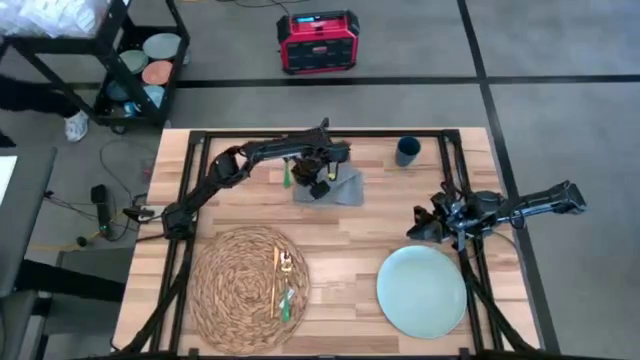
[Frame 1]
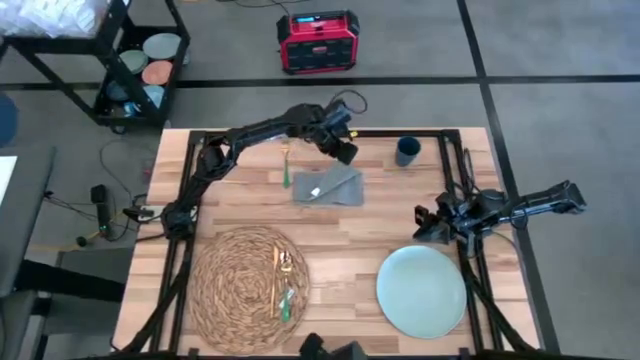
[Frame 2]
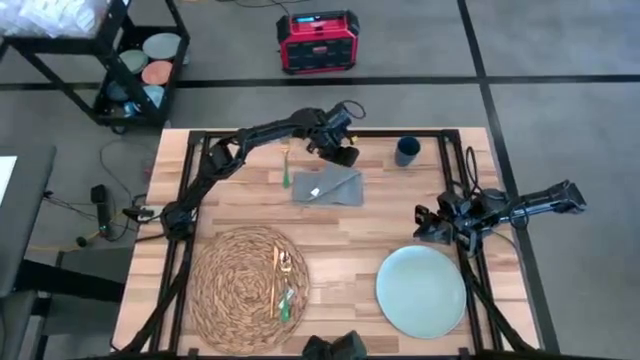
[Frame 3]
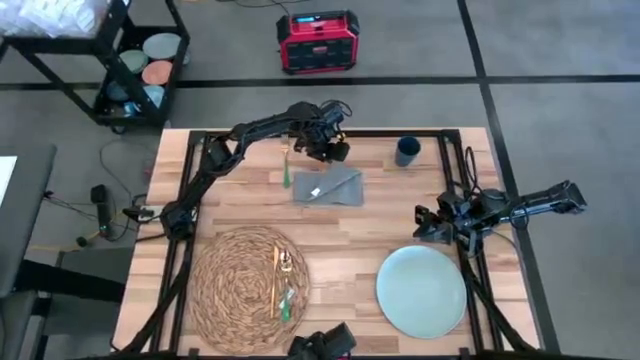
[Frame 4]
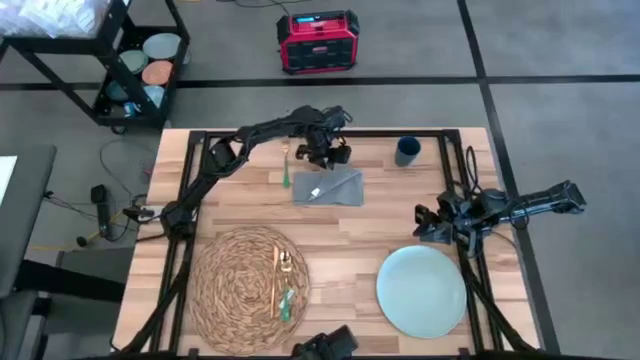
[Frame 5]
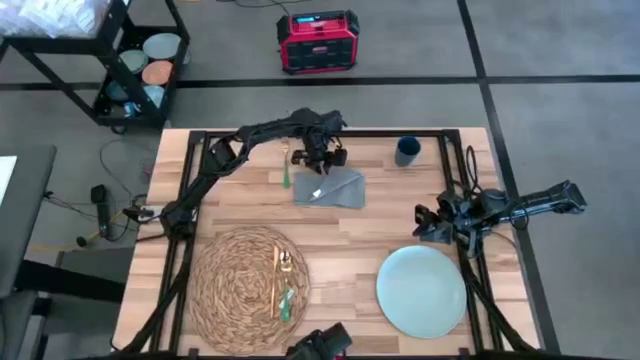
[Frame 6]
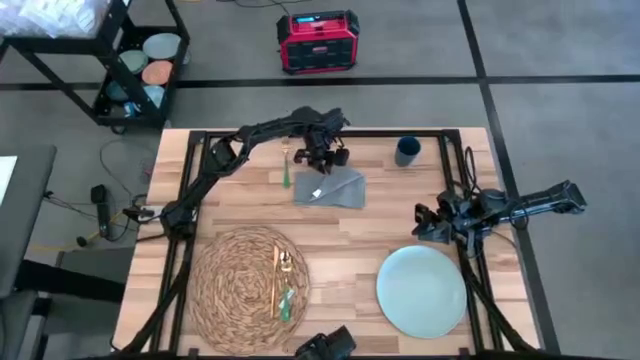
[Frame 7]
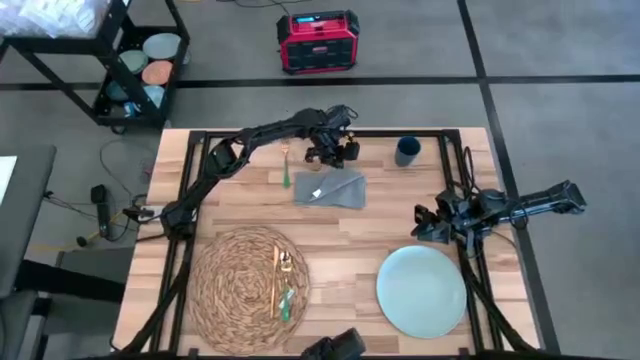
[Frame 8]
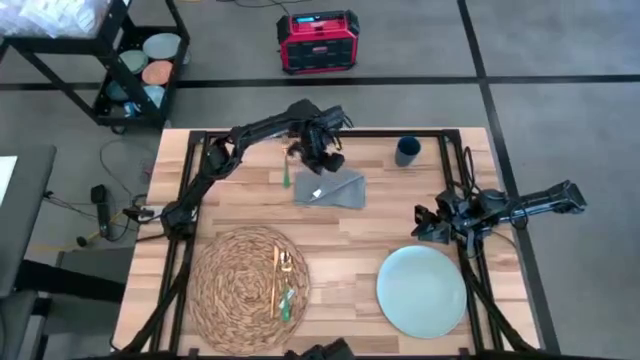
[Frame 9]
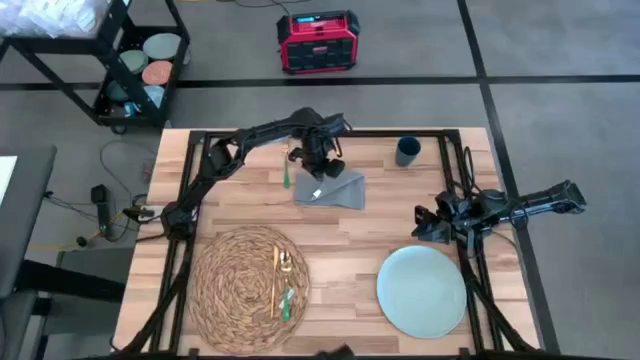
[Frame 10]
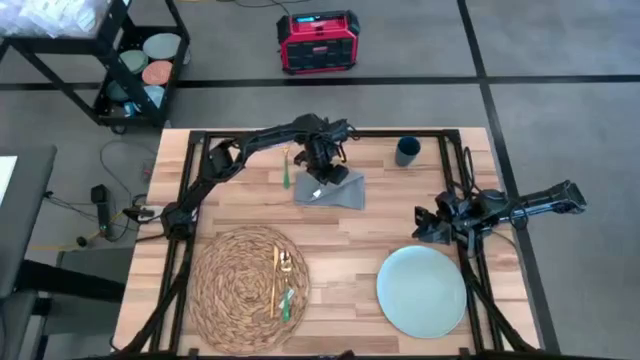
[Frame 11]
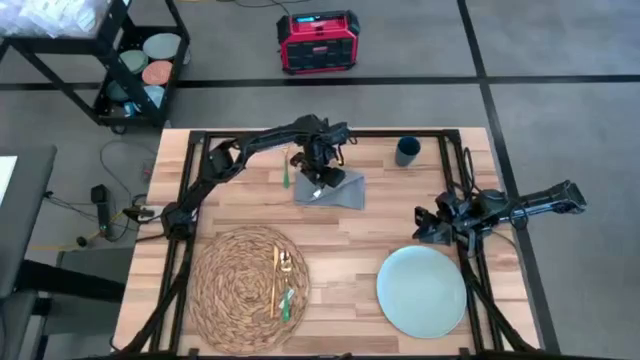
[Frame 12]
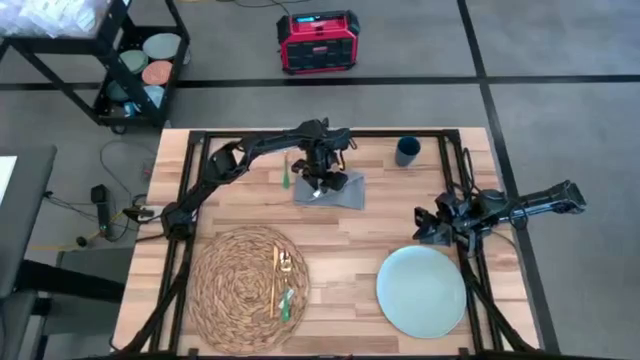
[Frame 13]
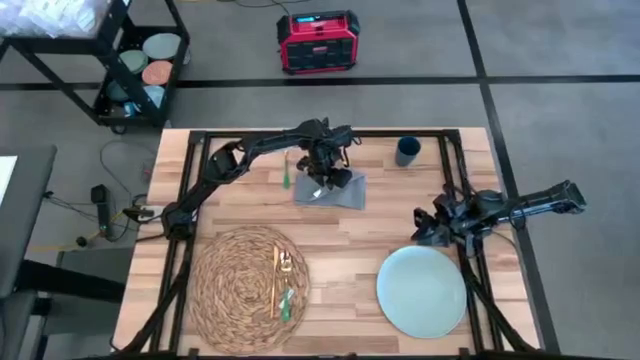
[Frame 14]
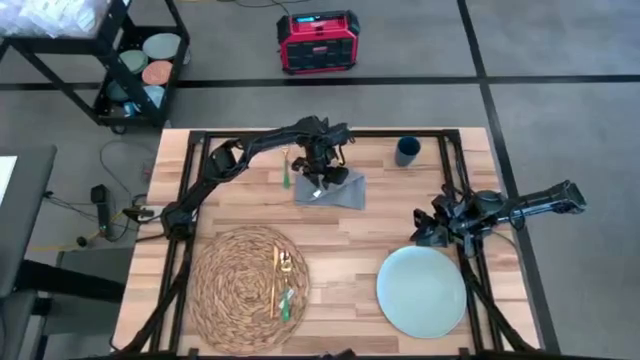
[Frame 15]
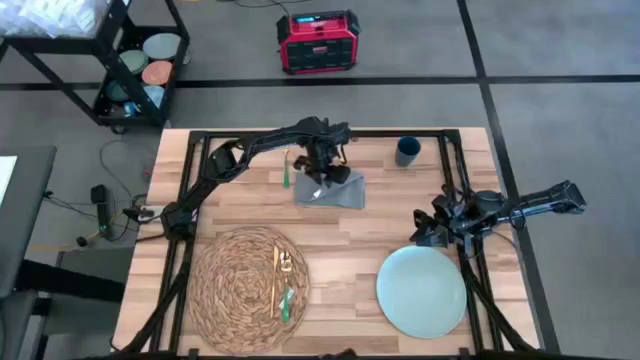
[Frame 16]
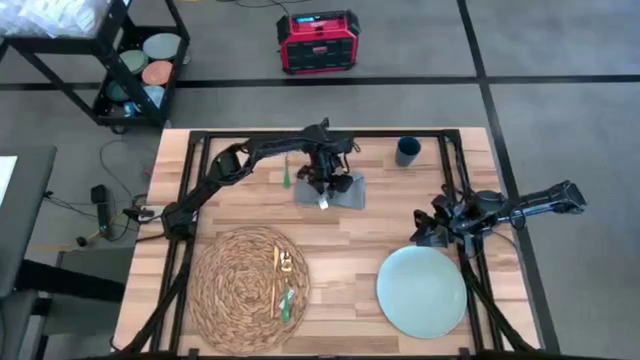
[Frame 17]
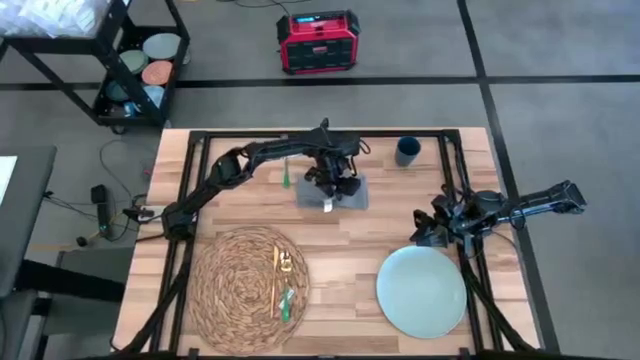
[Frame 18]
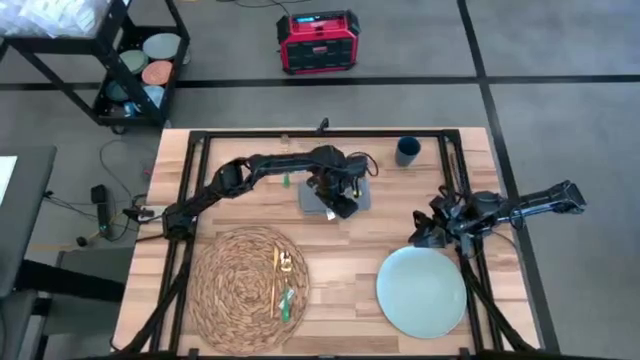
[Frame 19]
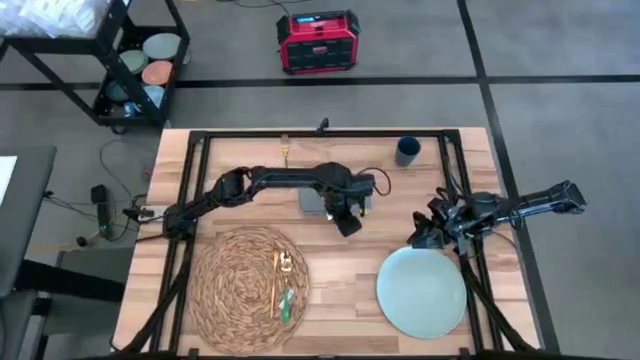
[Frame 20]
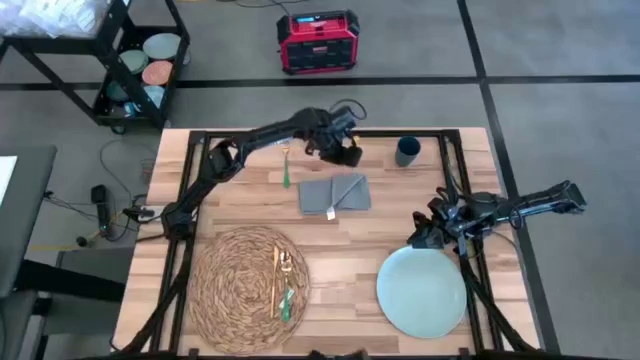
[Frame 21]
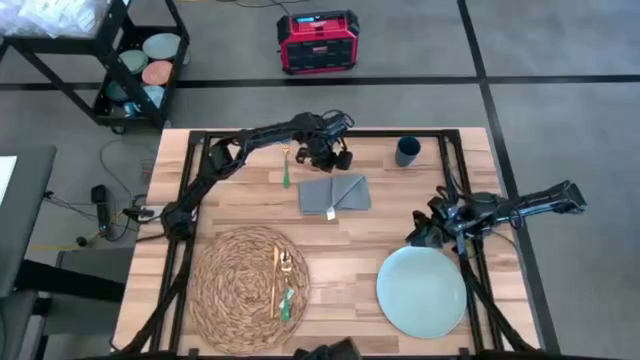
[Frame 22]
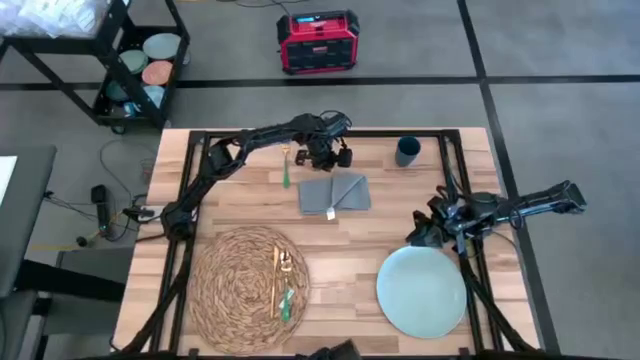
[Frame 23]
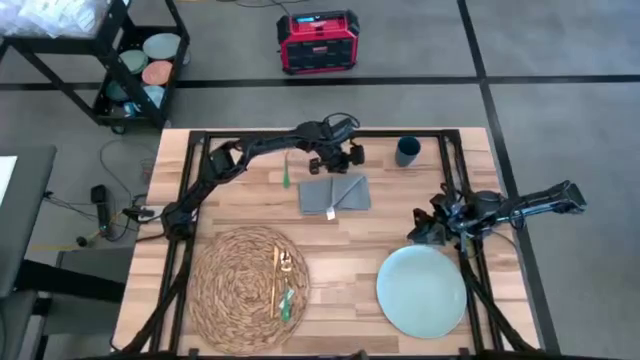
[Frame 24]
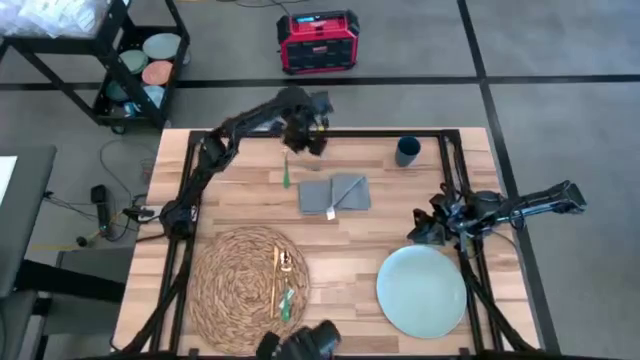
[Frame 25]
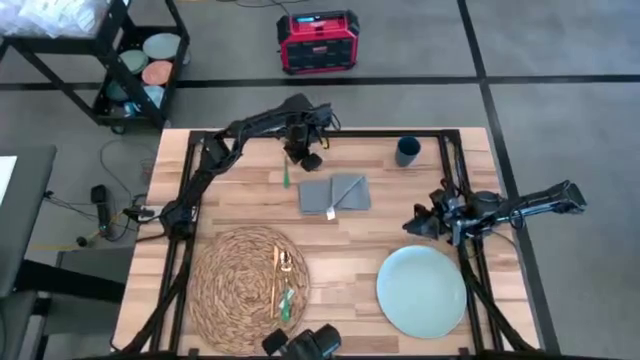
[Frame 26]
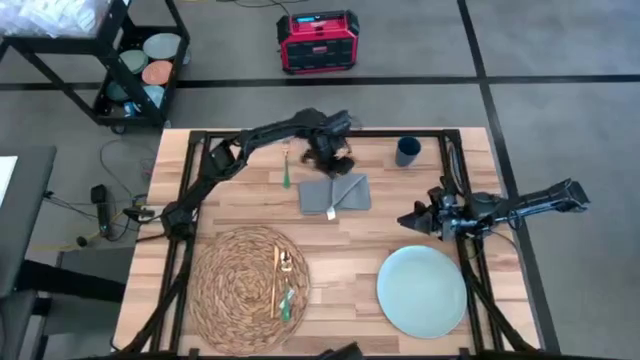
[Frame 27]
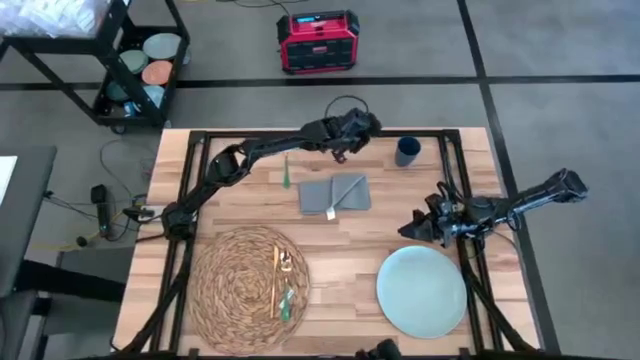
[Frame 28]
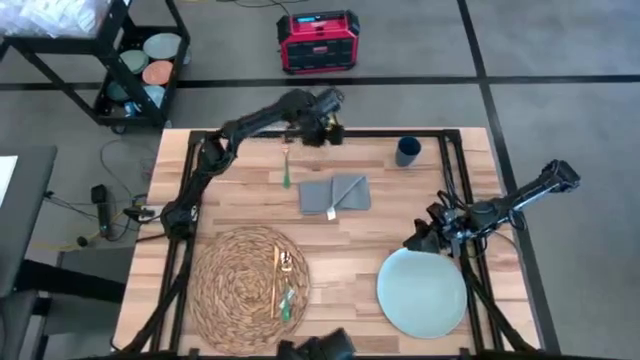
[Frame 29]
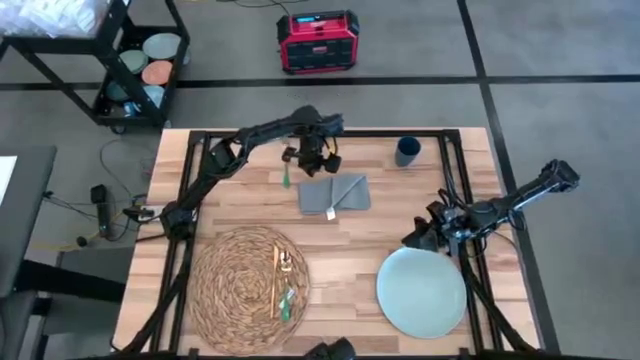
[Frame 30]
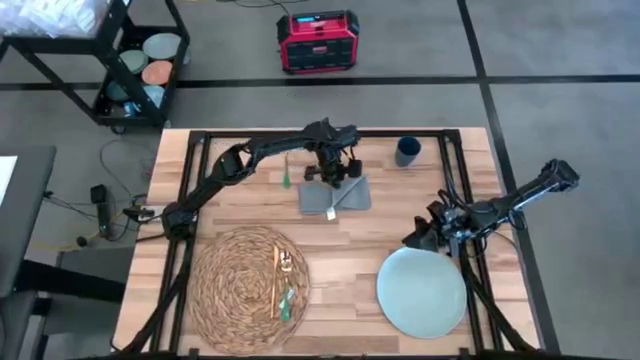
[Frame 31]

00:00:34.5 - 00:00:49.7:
Task: Set table place
Fold the gray table napkin

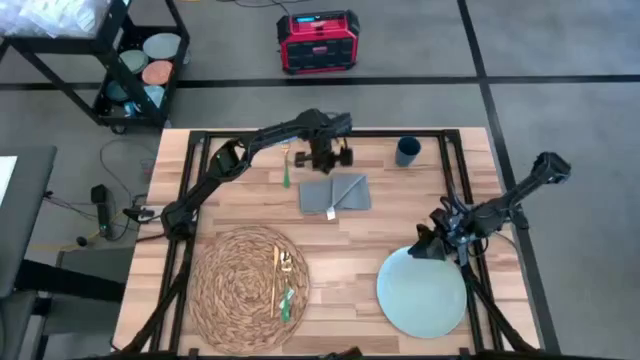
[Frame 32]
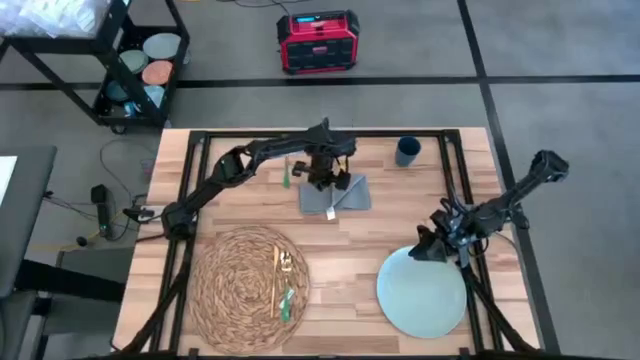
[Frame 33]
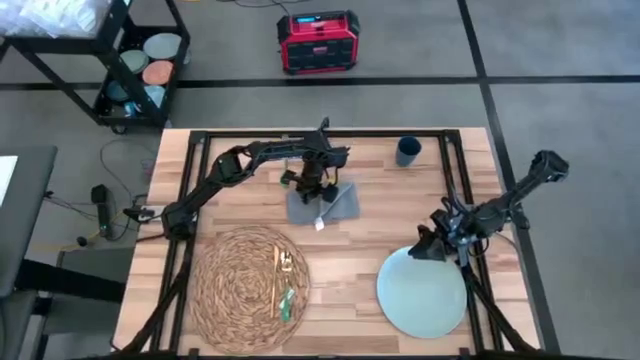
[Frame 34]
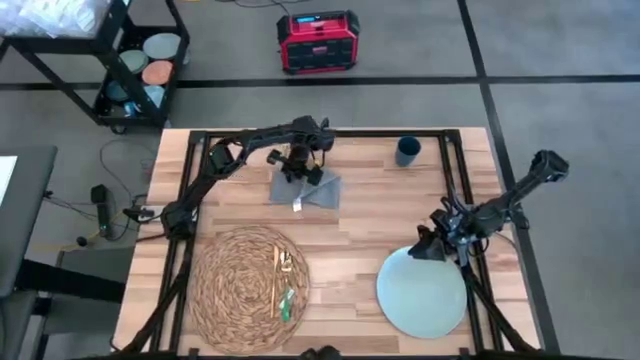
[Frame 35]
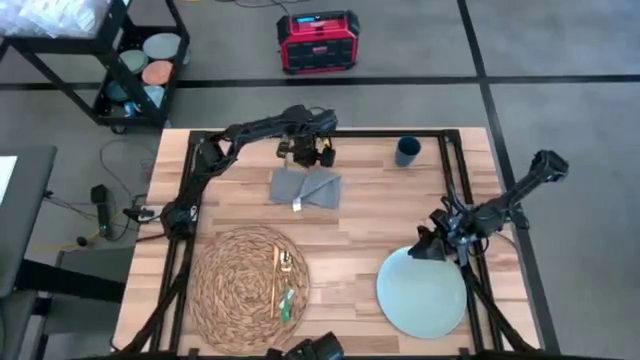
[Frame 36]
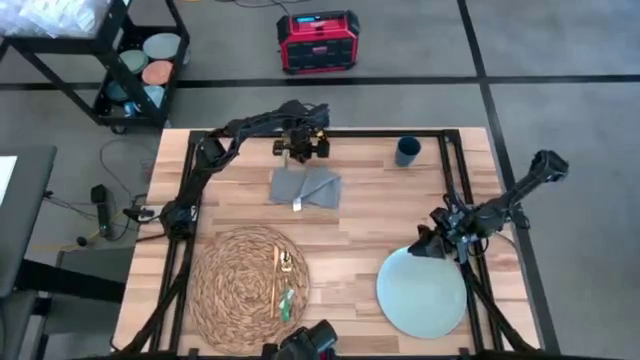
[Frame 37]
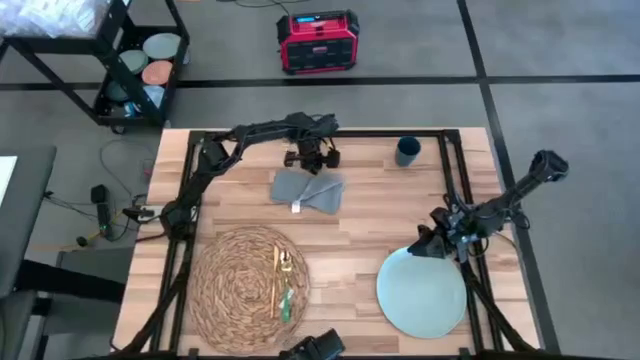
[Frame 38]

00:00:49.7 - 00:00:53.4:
Fold the gray table napkin

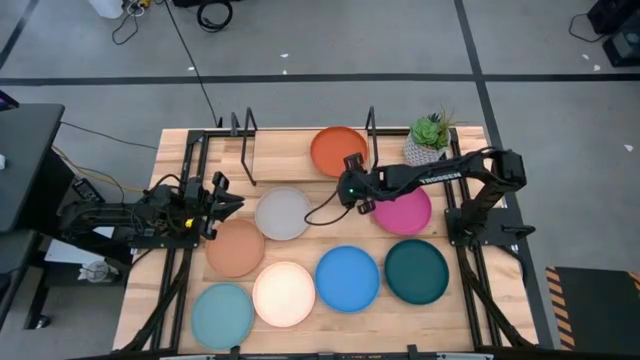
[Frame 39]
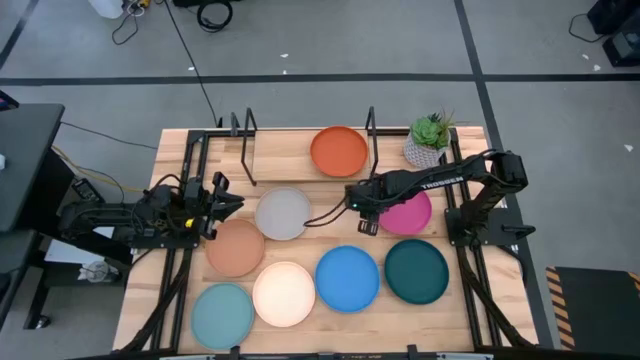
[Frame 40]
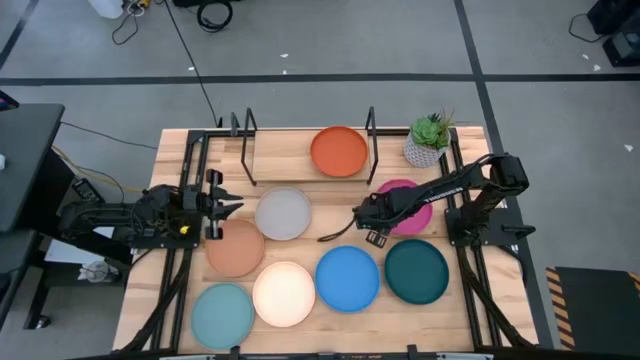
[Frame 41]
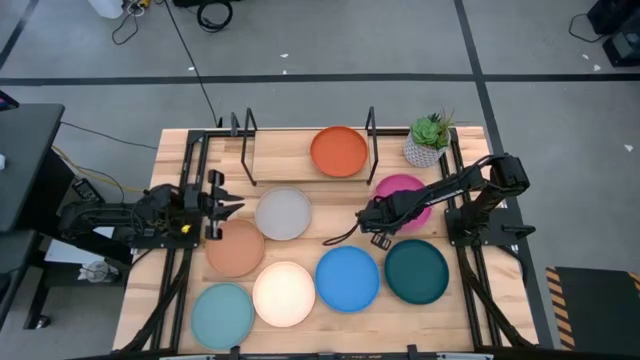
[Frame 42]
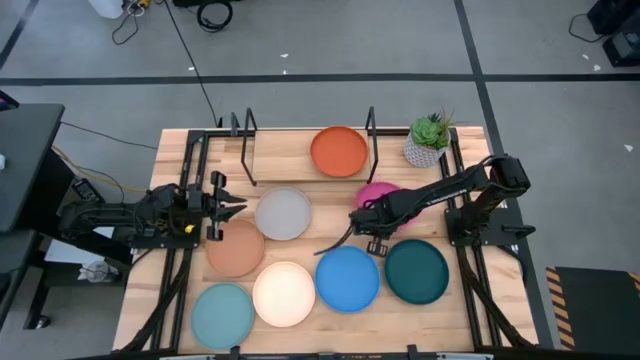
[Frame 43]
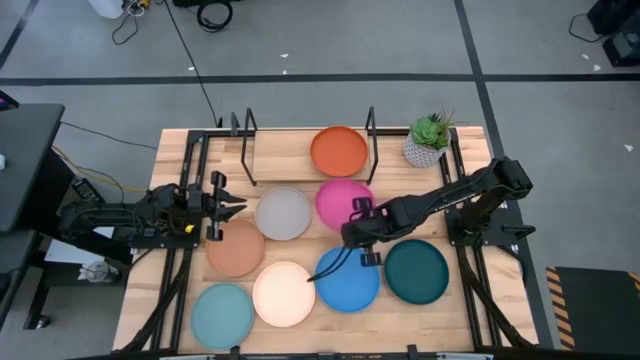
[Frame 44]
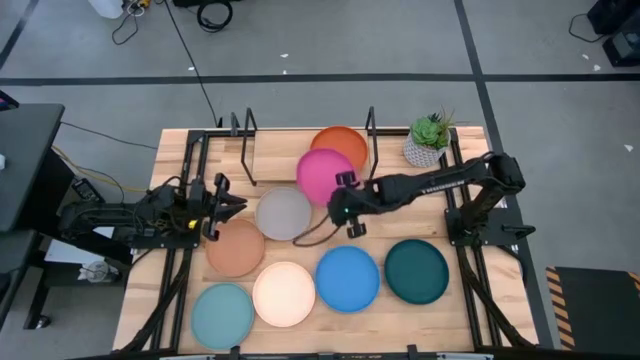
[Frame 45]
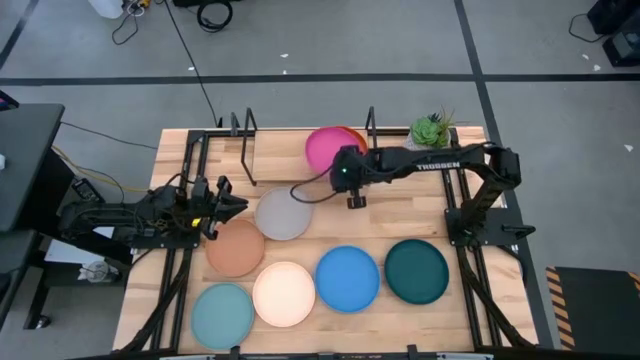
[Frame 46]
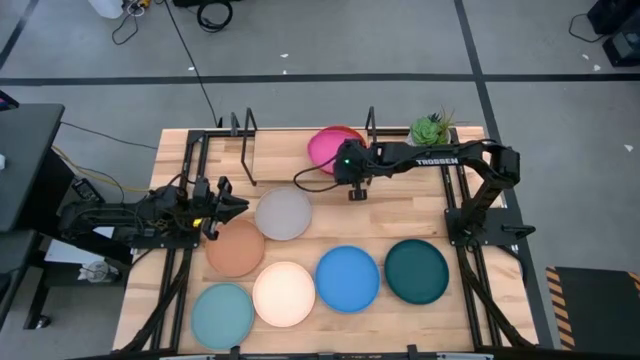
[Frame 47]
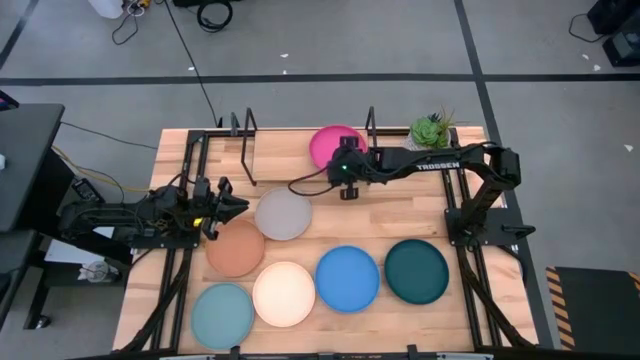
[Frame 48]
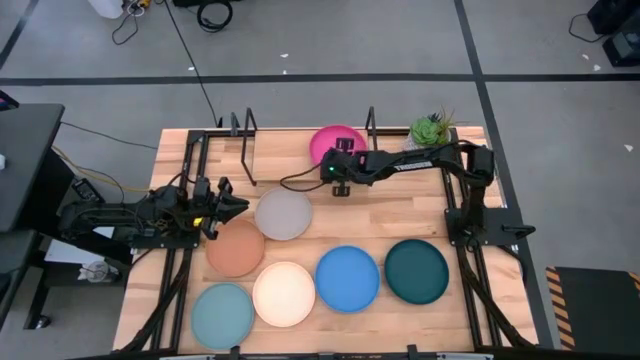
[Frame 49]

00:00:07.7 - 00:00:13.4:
Task: Place and stack plates onto a shelf
Stack the pink plate on top of the orange plate
